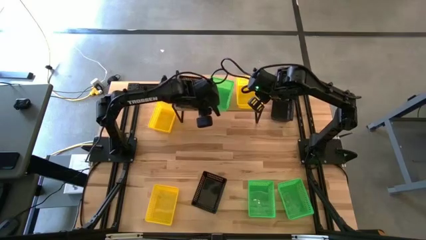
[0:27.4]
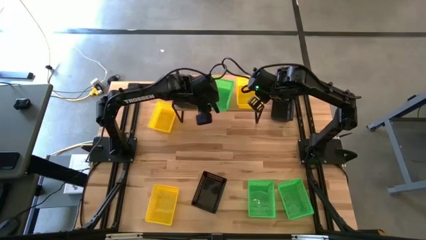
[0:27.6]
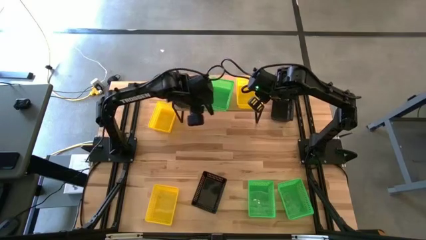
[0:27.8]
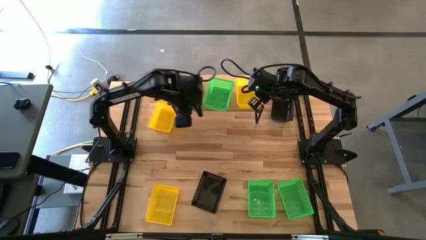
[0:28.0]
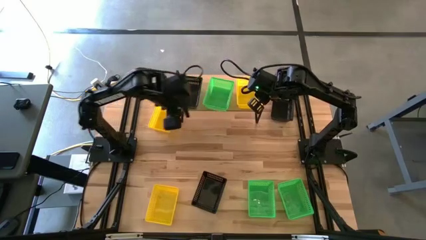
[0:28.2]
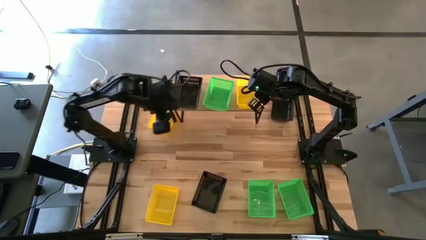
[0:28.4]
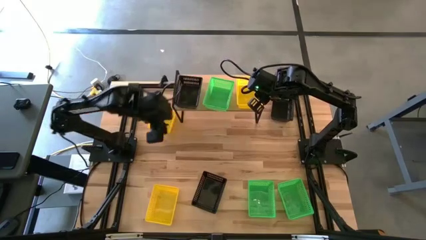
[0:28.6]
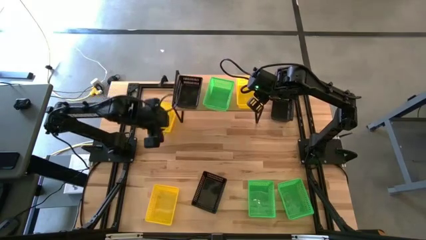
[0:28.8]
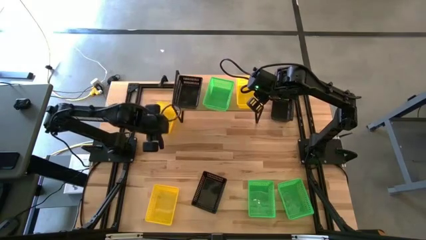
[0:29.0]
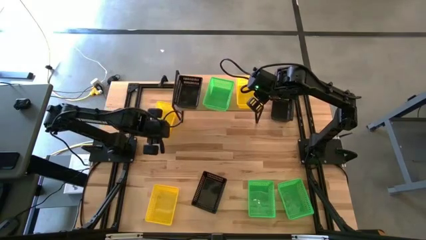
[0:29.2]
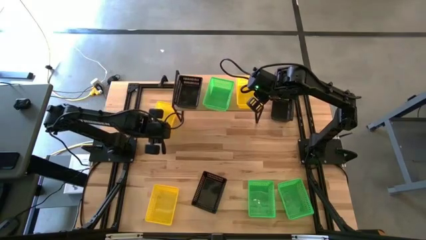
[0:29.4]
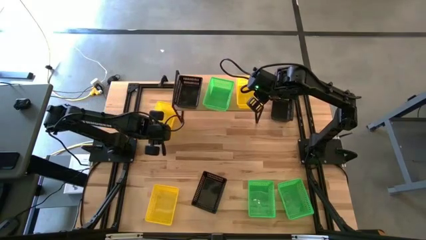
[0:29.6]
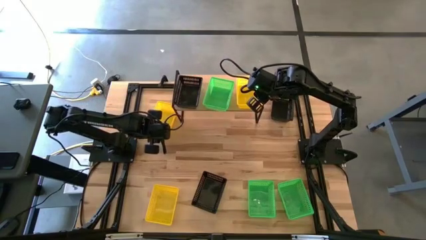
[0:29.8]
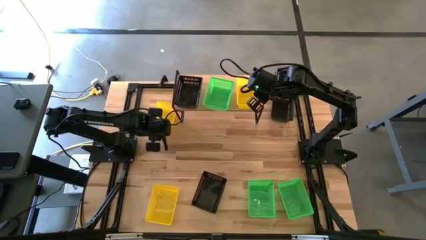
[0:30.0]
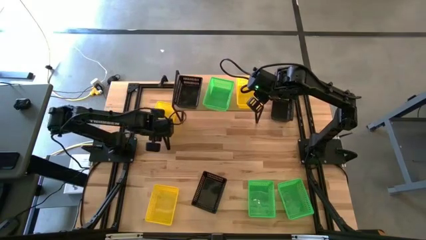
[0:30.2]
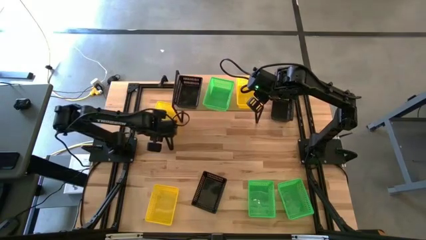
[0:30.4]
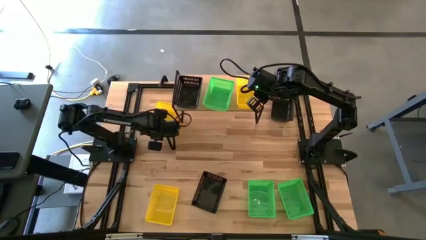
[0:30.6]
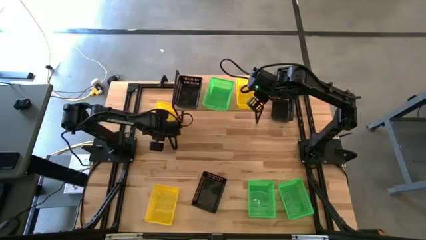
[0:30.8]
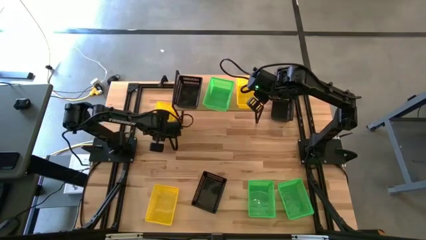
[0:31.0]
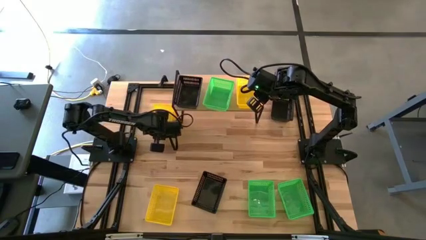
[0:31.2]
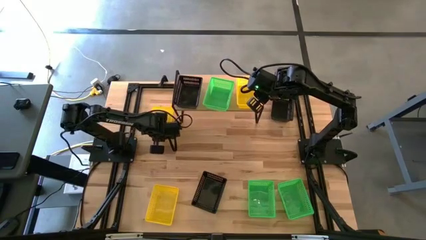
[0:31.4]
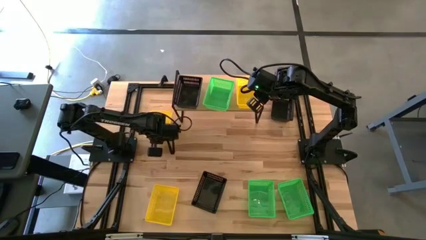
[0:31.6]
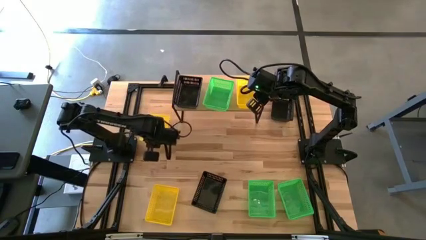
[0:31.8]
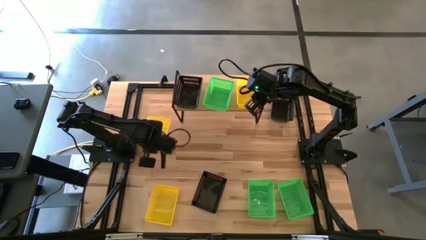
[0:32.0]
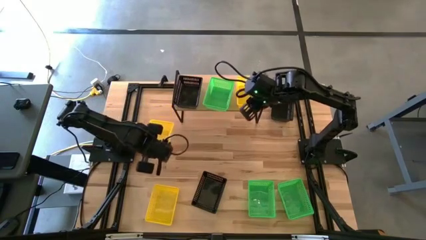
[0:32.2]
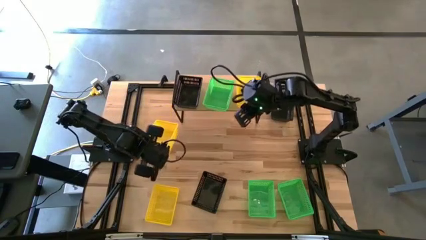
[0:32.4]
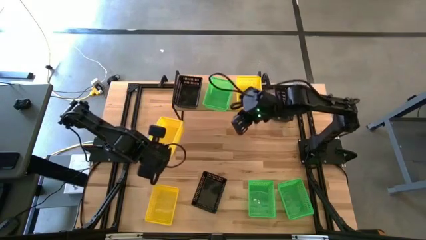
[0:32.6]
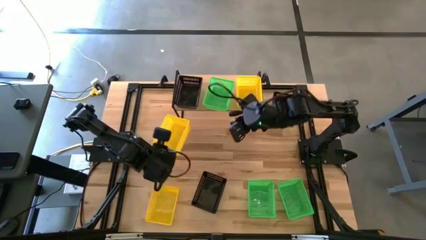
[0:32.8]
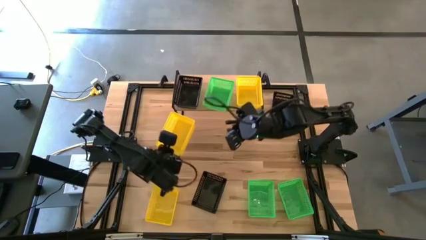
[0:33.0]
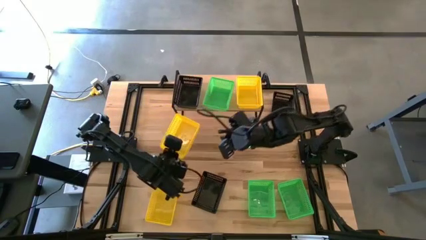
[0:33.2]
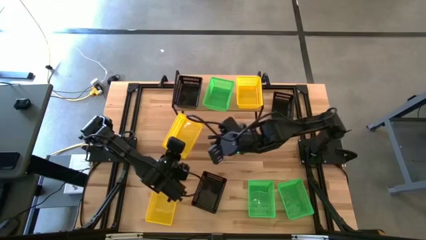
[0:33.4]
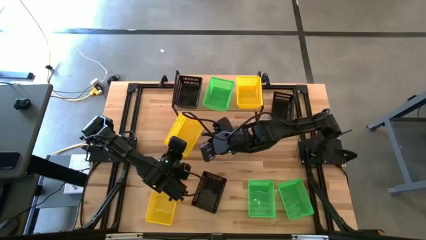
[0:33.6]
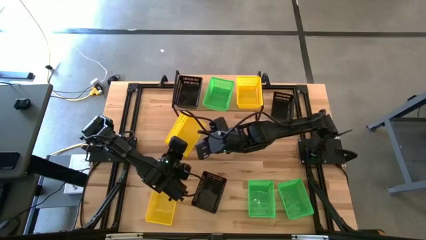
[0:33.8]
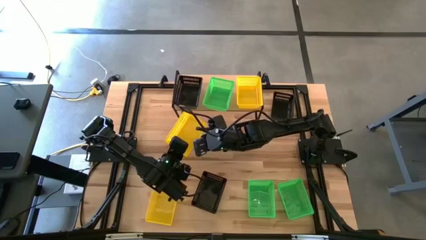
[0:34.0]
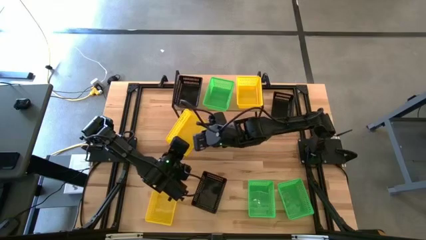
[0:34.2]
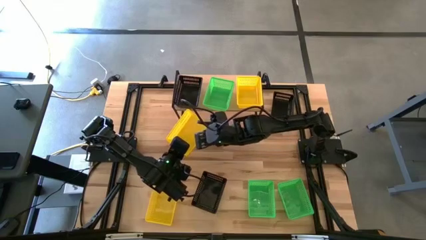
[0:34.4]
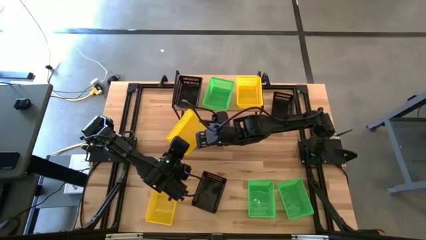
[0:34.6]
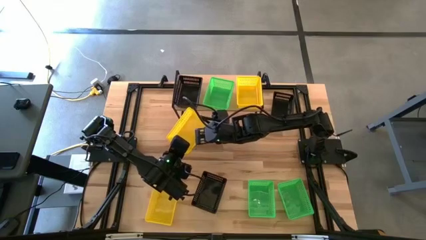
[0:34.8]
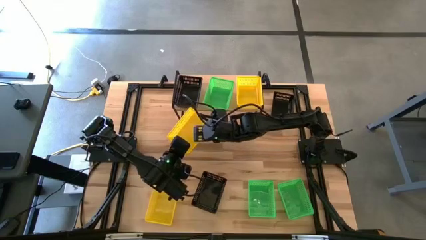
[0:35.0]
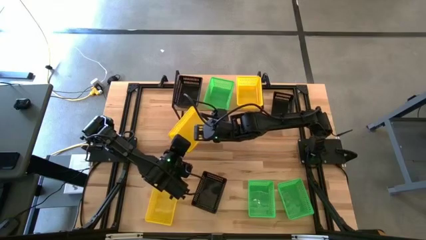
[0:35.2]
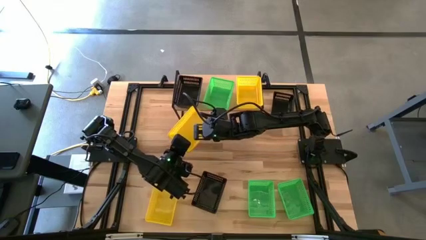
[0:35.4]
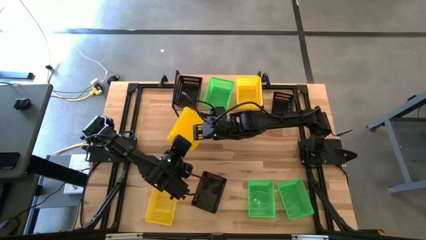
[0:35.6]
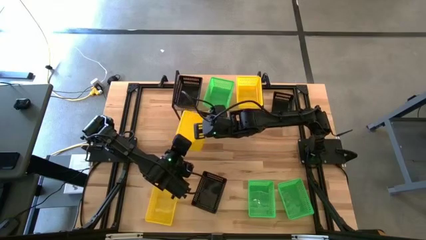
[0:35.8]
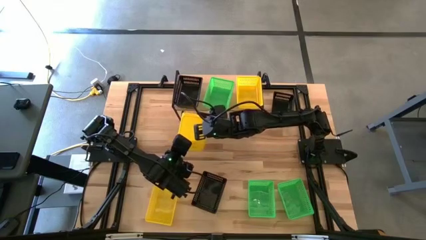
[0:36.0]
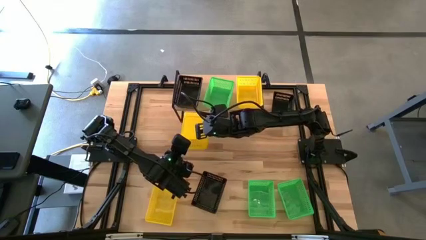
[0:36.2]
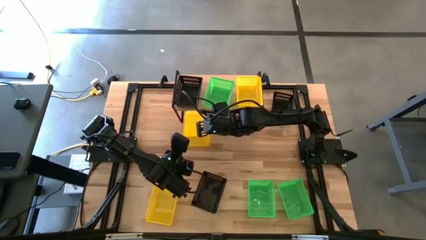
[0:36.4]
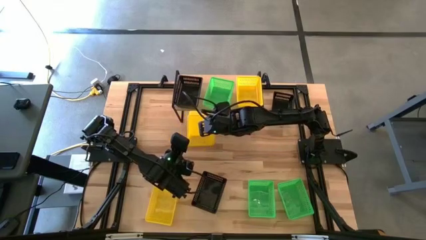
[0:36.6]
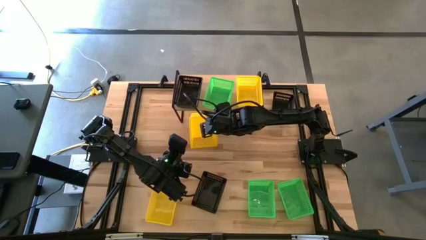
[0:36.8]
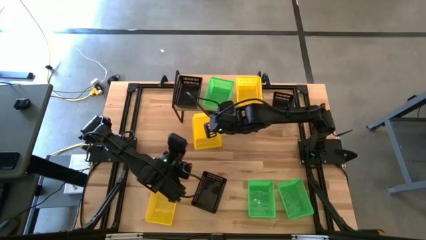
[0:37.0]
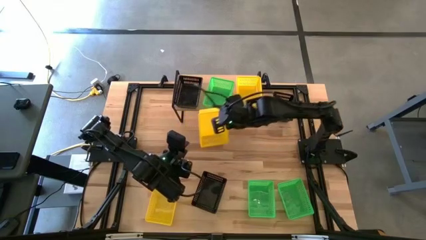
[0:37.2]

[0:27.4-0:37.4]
Task: Stack baskets on shelf by color
Stack the top yellow bin on top of the other yellow bin on the shelf

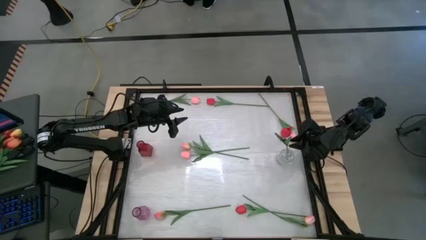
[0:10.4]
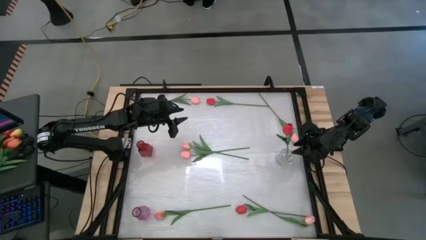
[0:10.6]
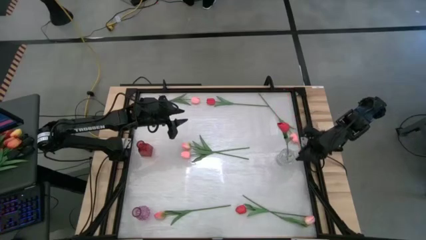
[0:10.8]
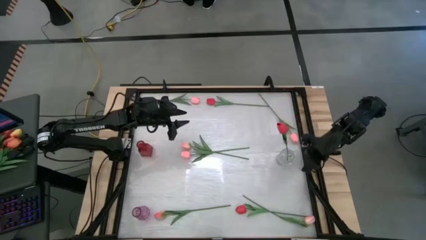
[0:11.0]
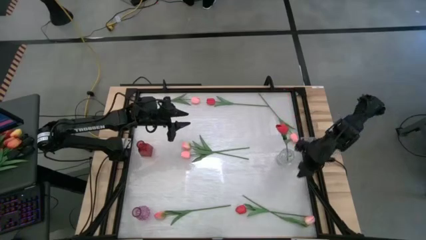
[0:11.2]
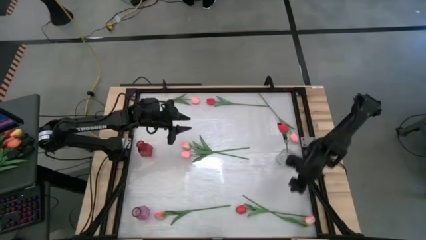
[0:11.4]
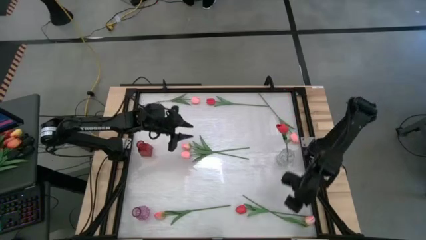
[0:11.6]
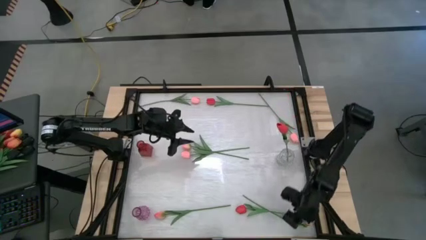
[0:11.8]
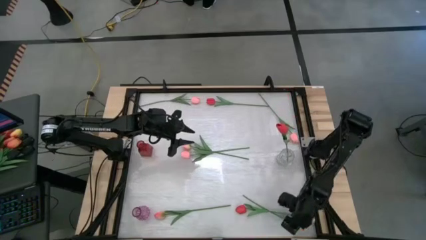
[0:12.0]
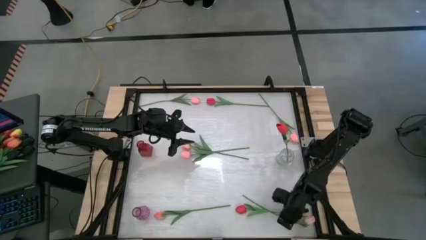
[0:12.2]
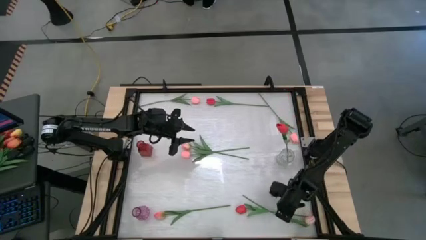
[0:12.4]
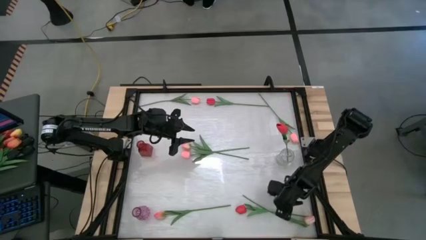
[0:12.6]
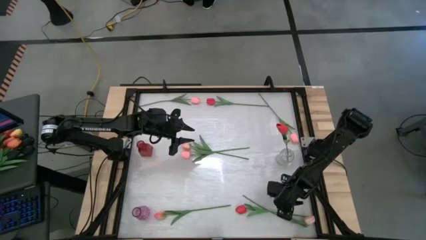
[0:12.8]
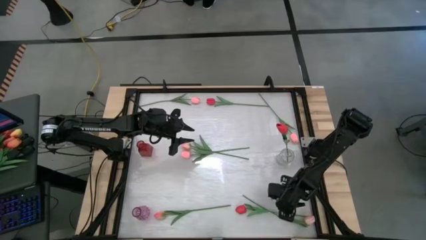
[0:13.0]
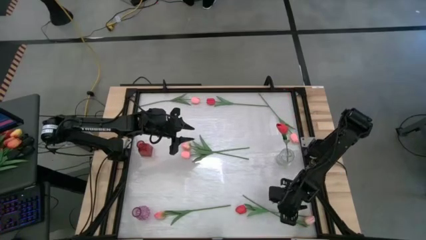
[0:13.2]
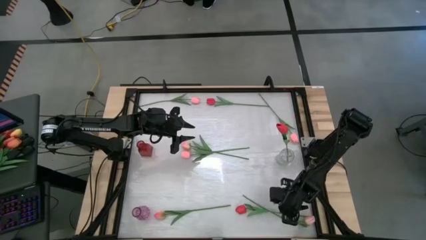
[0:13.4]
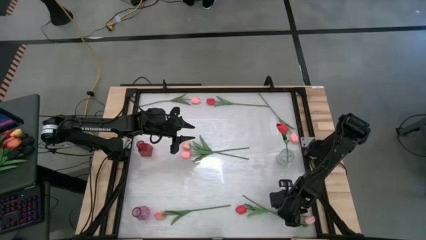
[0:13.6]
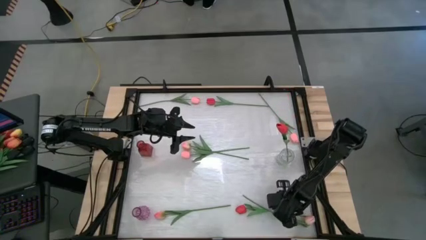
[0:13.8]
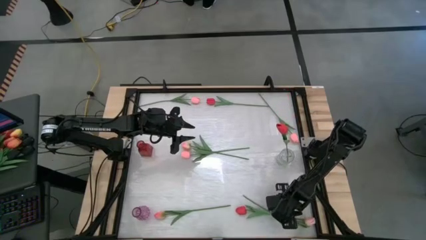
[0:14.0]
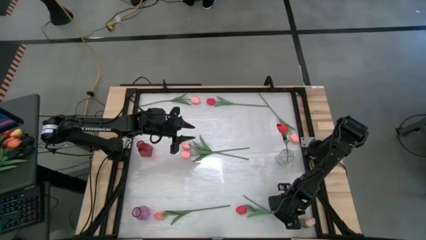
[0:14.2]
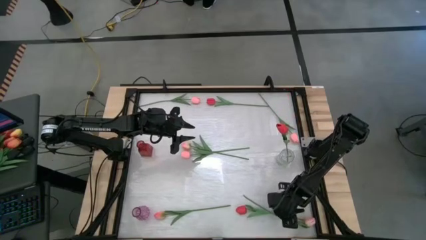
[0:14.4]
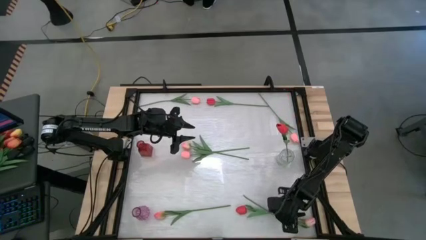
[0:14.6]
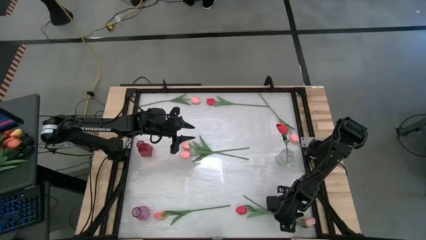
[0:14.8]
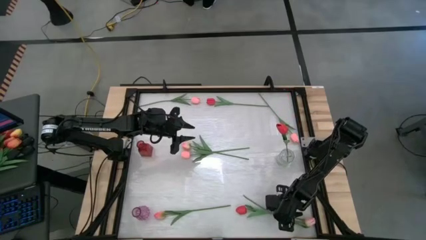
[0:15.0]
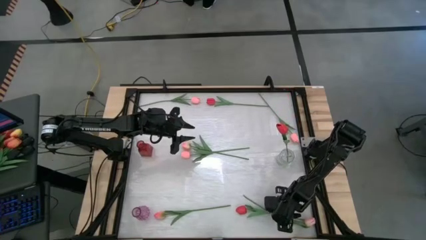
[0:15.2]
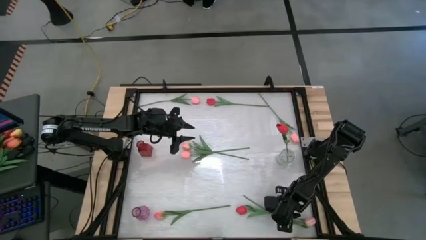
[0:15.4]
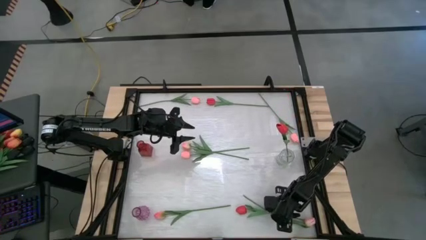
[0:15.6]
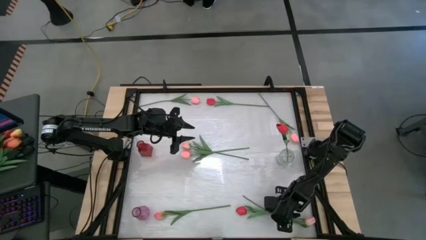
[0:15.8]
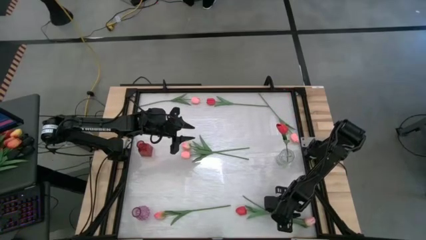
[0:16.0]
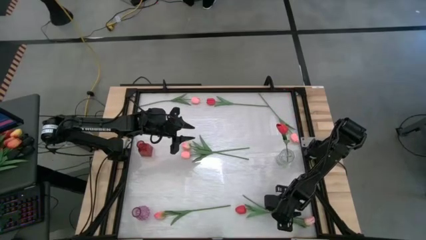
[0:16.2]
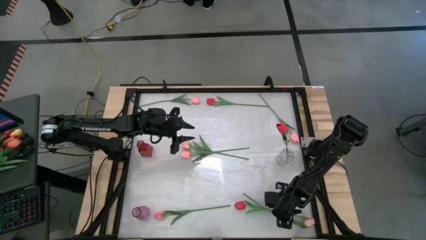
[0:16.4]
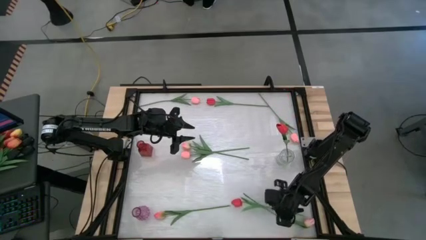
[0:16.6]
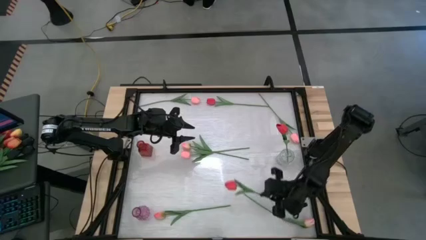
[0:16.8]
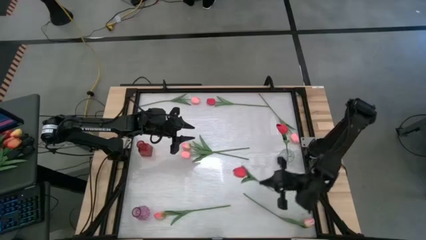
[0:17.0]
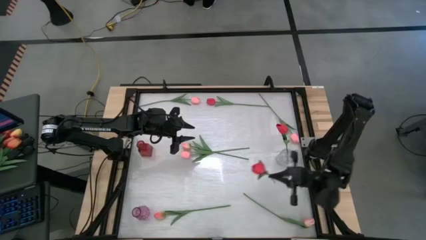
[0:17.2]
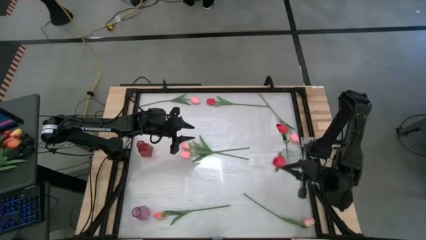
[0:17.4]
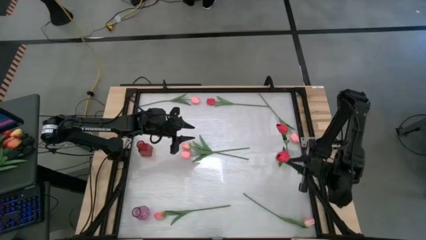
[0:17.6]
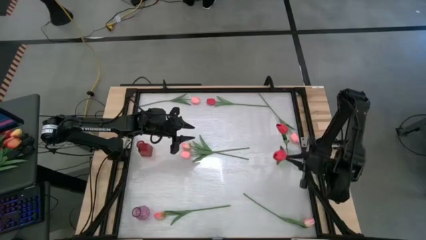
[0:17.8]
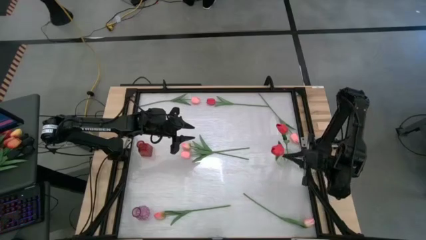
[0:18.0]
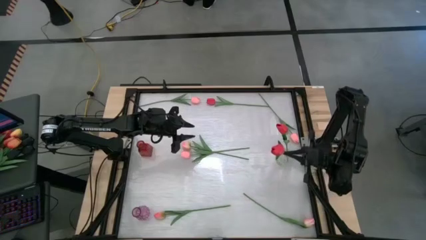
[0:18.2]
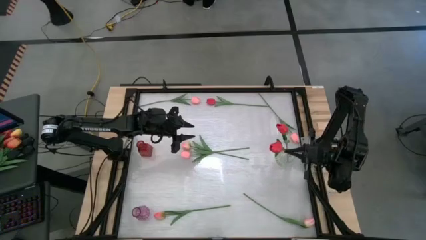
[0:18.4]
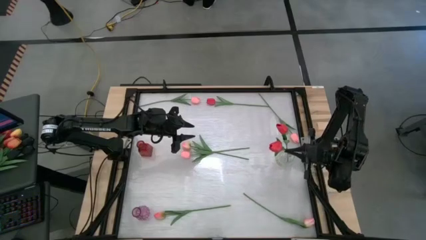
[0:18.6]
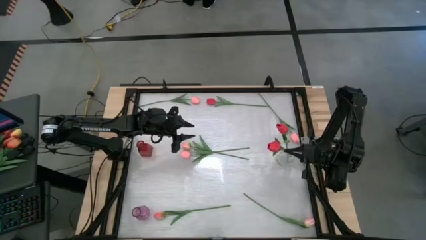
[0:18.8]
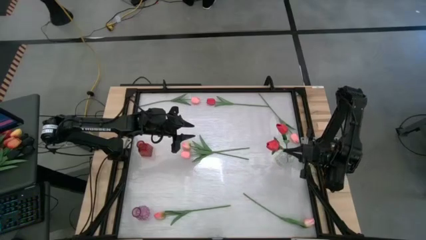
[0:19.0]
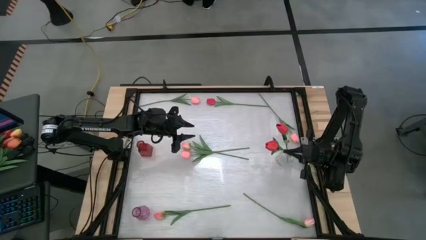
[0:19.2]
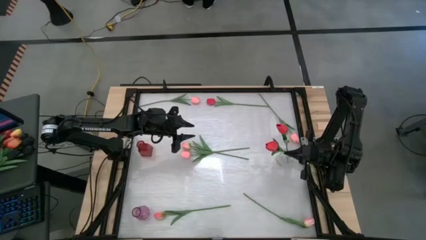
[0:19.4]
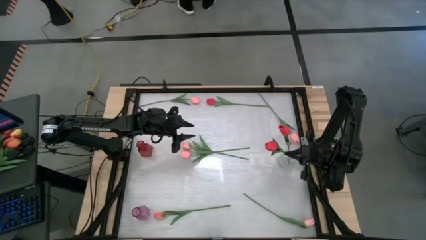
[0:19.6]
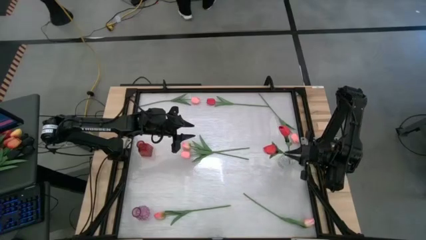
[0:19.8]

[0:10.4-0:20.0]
Task: Sort flowers into vase by color
Put the bottom red flower into the transparent flower vase
